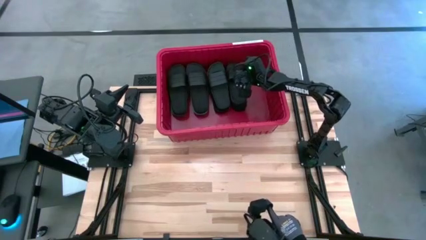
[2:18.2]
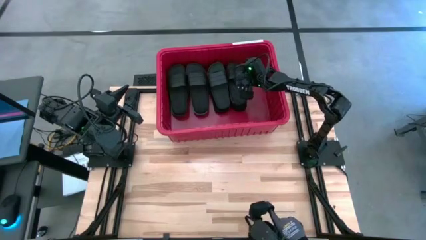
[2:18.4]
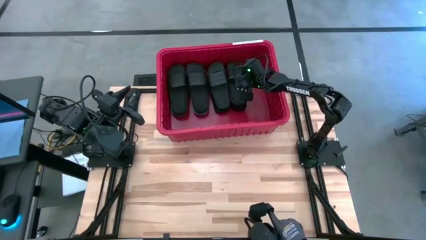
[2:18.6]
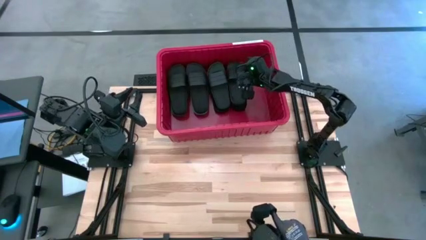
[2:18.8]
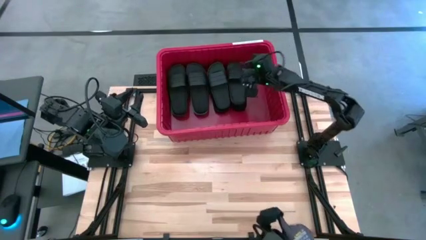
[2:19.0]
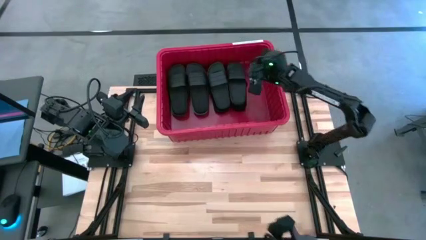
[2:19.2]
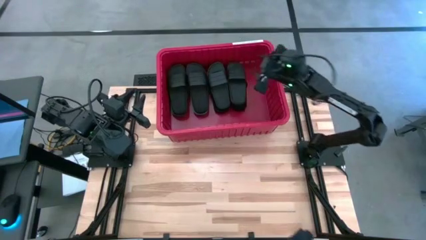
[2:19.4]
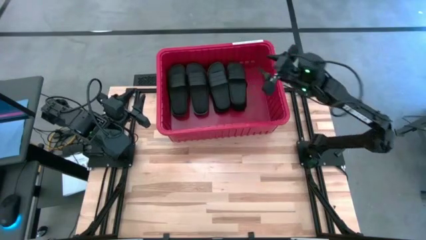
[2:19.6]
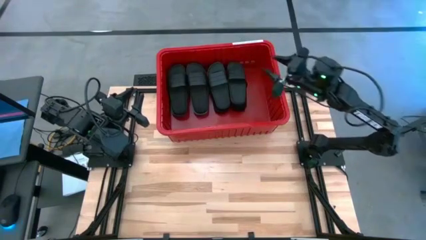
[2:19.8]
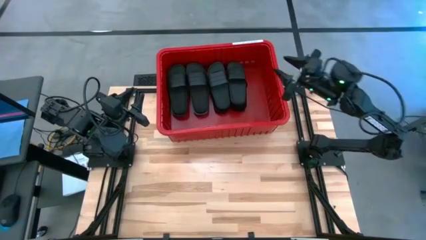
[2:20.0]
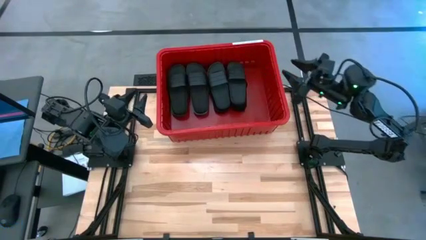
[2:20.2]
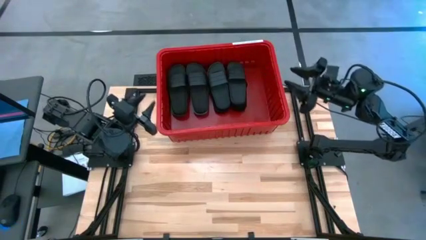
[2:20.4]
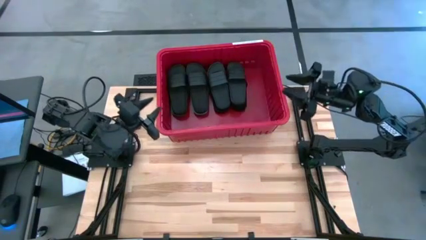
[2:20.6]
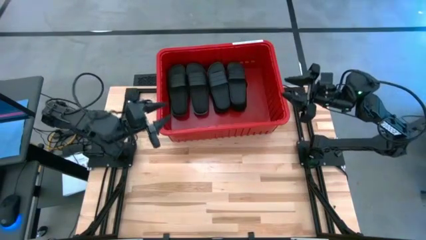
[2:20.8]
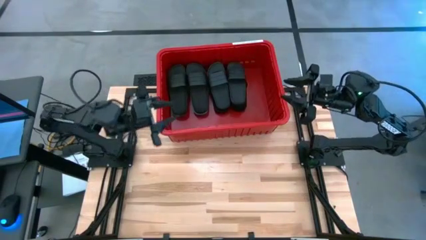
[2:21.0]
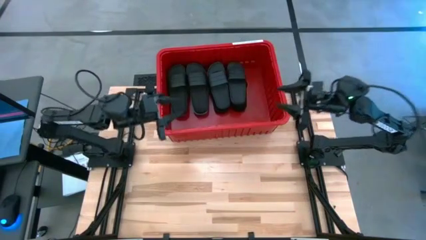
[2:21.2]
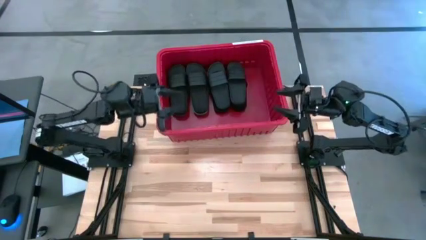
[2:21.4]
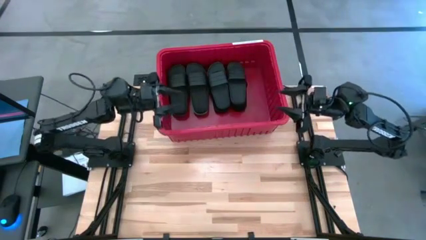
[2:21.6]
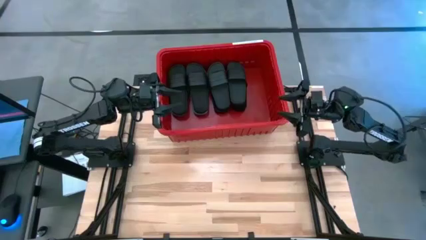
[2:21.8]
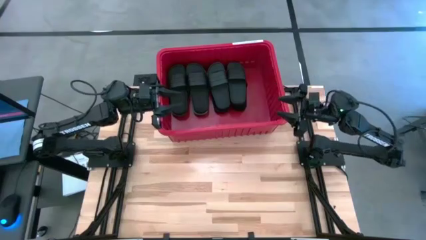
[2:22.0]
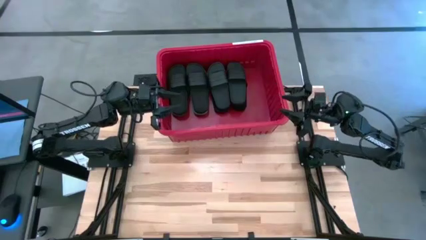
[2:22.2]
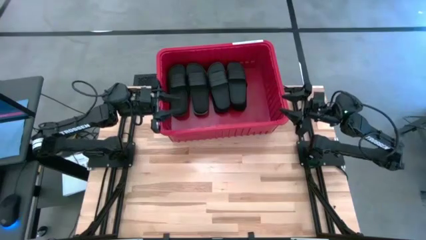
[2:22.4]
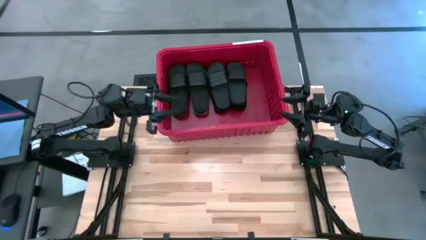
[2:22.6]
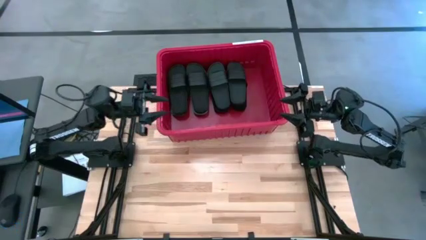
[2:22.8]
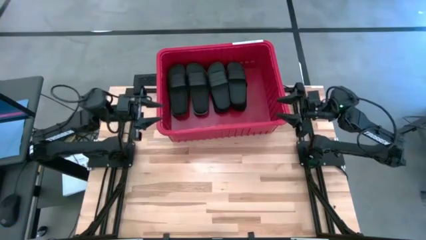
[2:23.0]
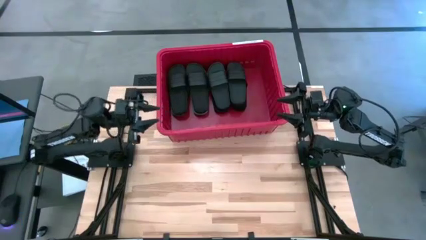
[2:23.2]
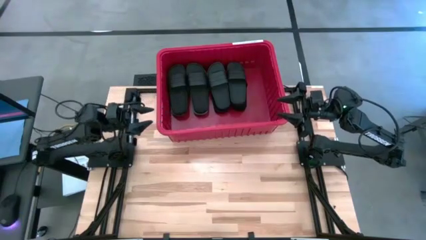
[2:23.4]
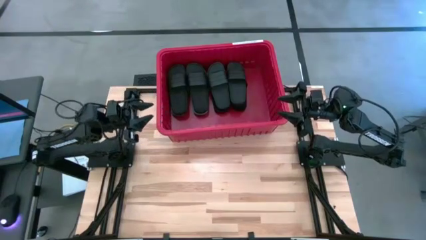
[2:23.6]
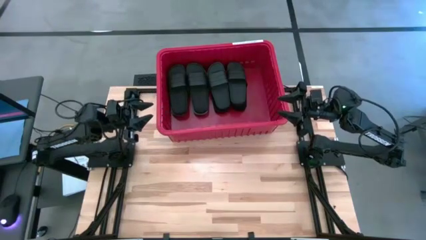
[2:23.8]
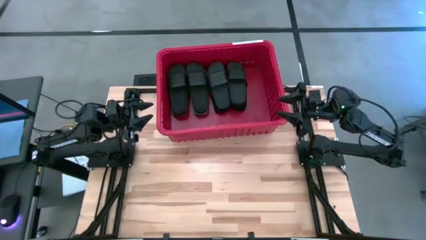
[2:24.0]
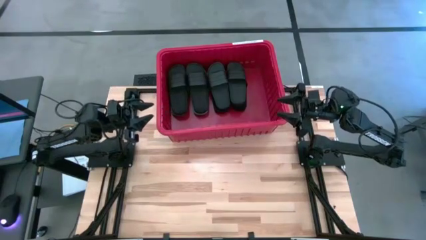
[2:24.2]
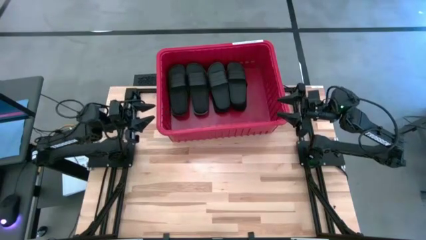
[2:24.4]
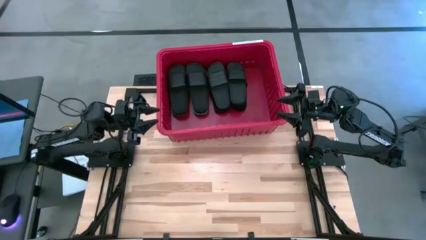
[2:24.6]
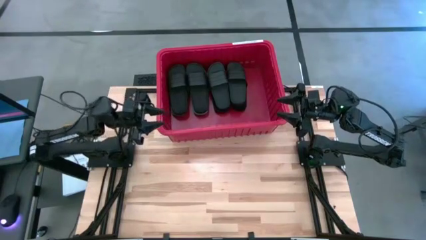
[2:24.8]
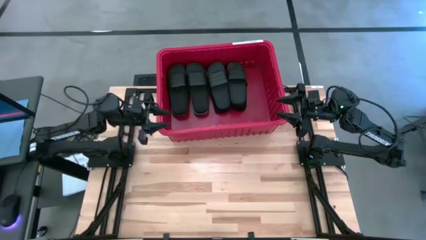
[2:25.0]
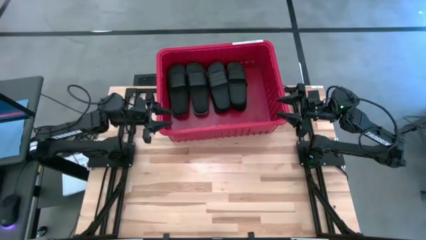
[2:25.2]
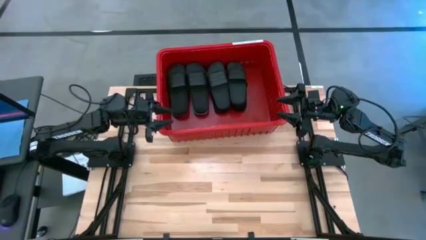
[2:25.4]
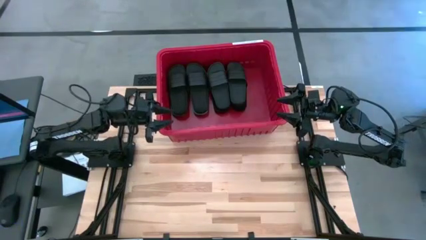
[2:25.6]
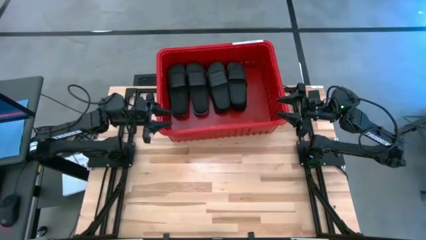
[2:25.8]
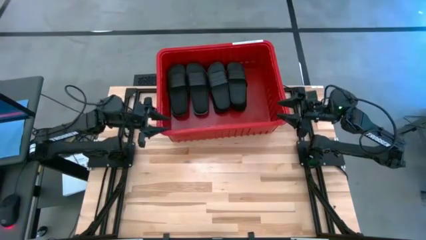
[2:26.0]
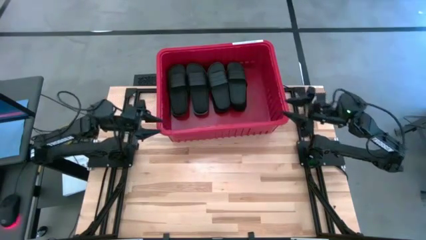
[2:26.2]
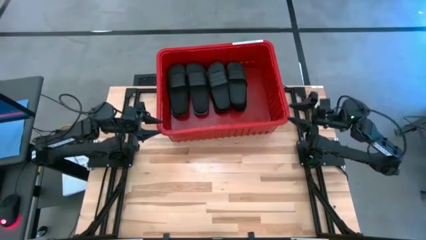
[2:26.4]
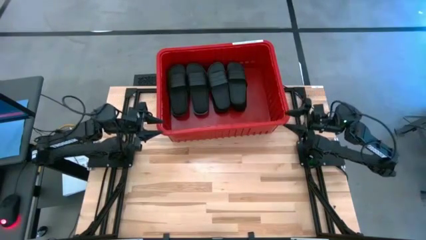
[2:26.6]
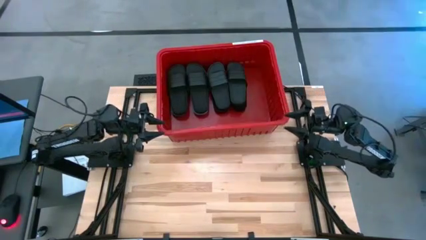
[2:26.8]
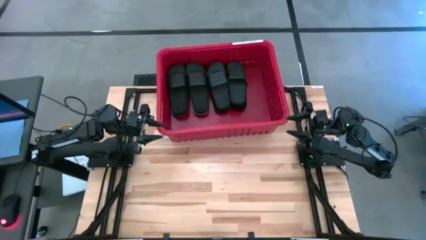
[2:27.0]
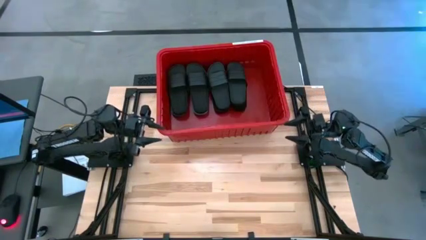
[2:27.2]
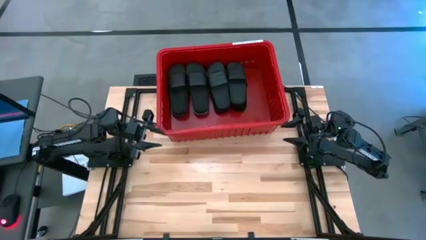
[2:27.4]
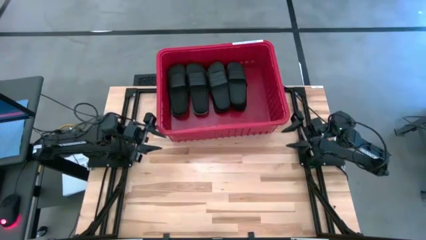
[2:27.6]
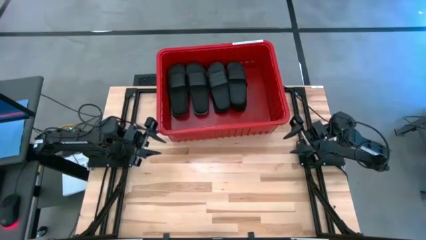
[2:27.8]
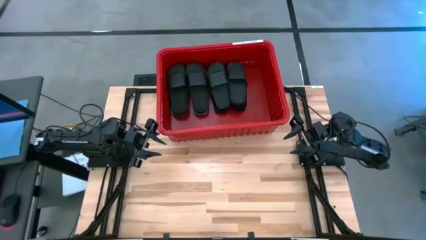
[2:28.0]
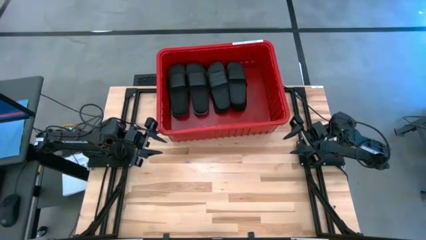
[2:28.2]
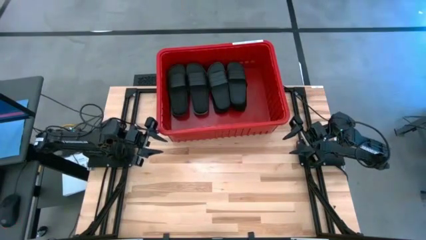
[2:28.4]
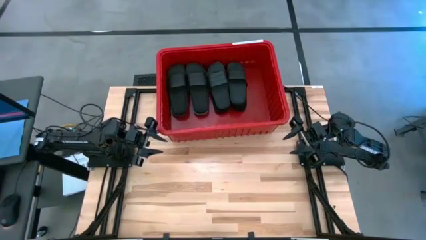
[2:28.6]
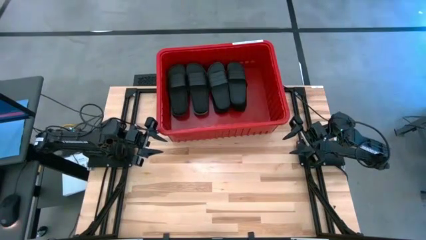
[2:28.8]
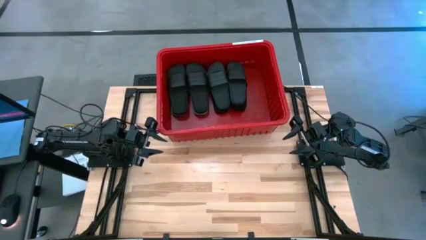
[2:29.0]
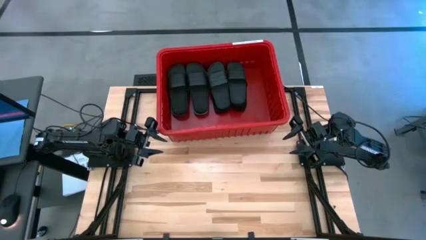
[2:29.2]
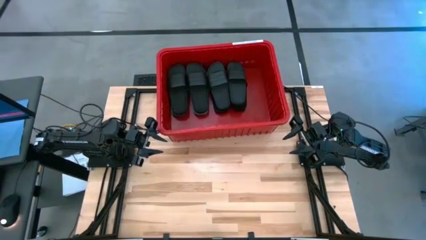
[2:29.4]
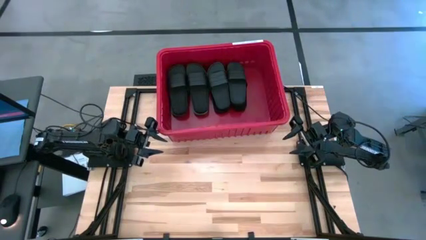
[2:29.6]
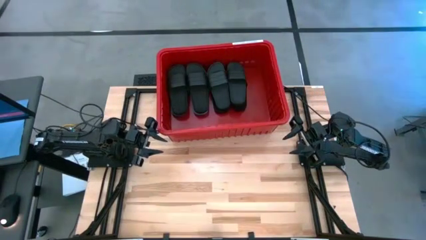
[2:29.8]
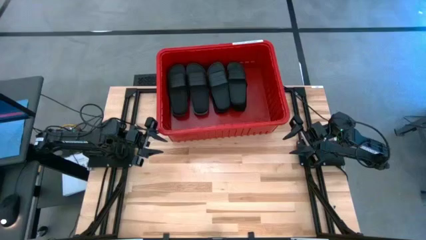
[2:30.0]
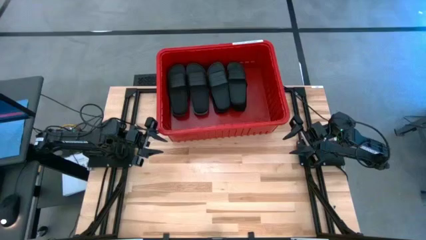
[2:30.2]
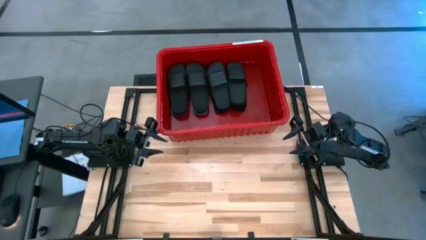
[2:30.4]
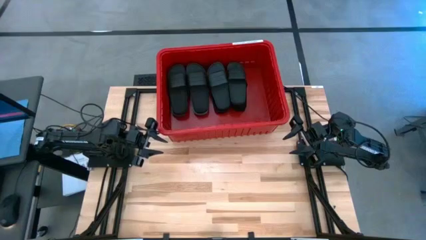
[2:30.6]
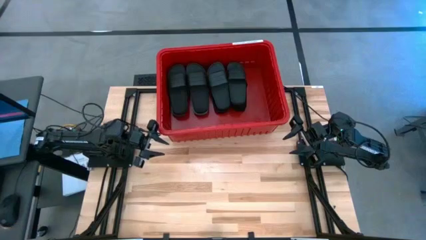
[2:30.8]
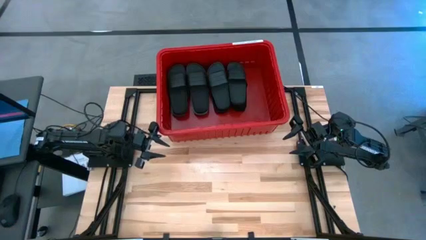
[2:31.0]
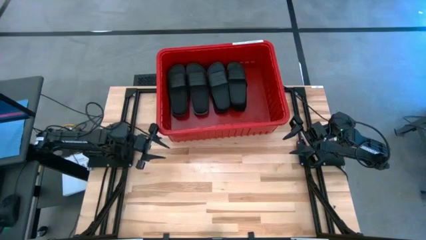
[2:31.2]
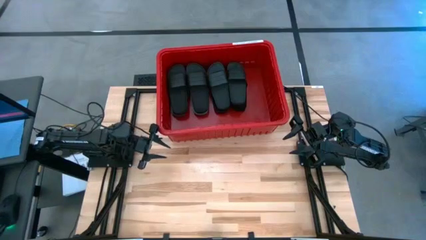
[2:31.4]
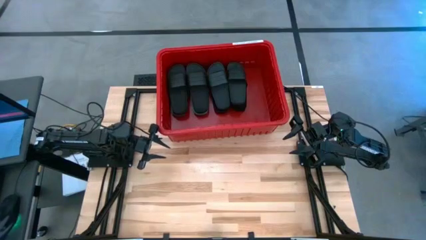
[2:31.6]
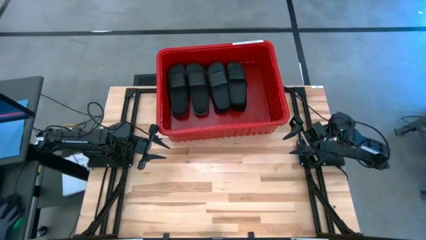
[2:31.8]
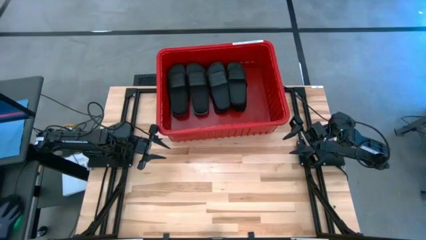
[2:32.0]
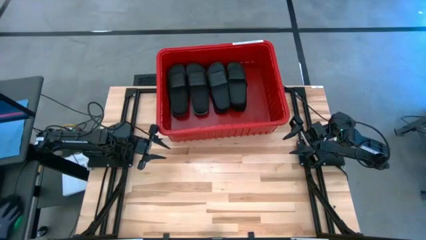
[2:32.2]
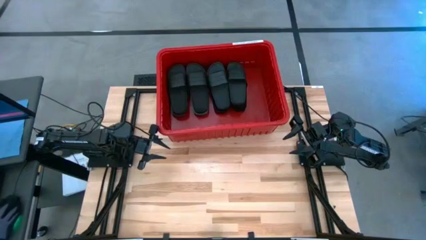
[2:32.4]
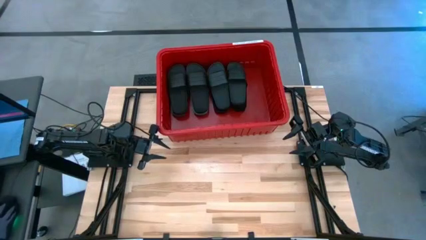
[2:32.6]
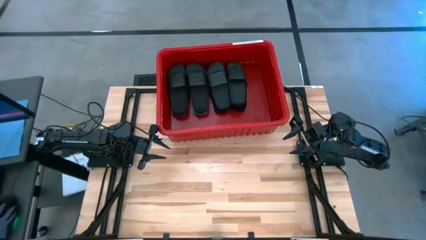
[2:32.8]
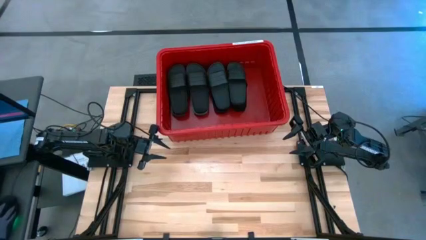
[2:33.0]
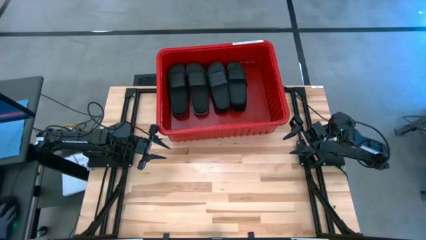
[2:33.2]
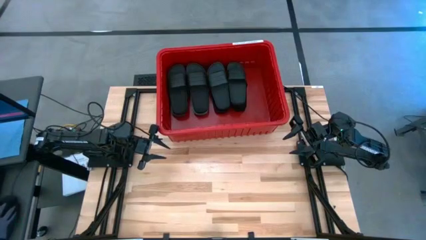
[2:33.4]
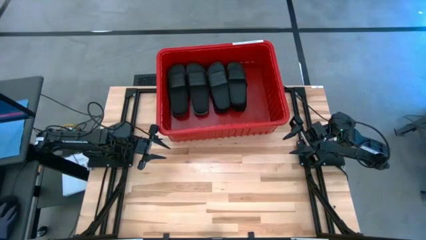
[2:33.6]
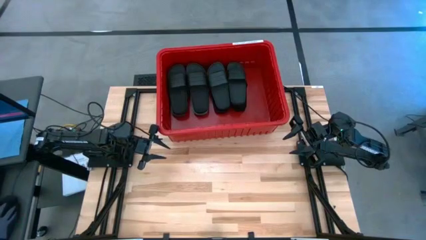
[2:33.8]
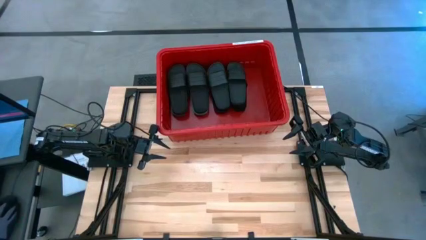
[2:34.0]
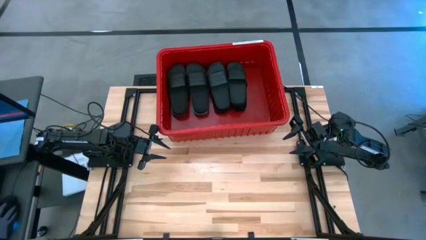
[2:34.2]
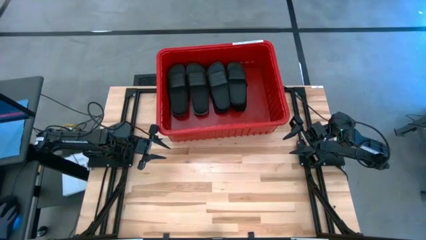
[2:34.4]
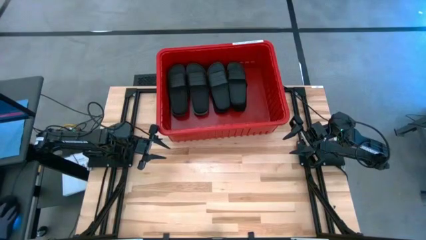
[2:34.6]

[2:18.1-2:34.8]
Task: Pick and place slides into bin
Return to Home Position
